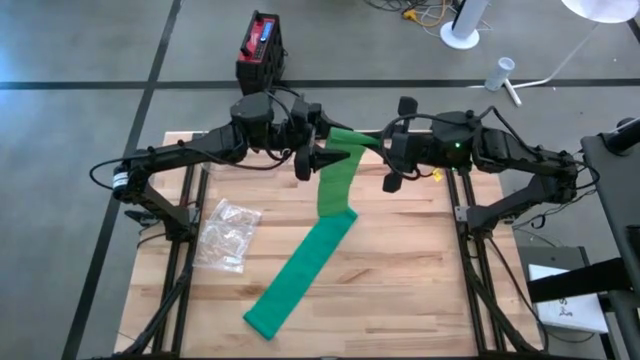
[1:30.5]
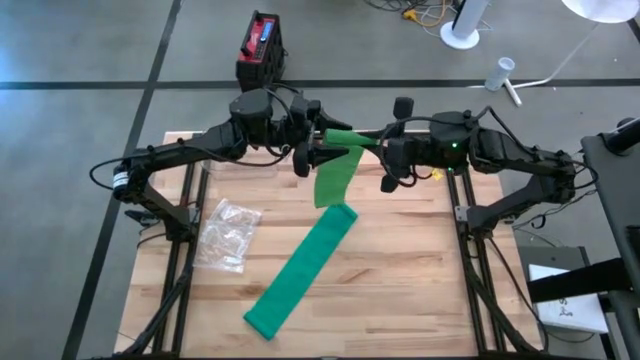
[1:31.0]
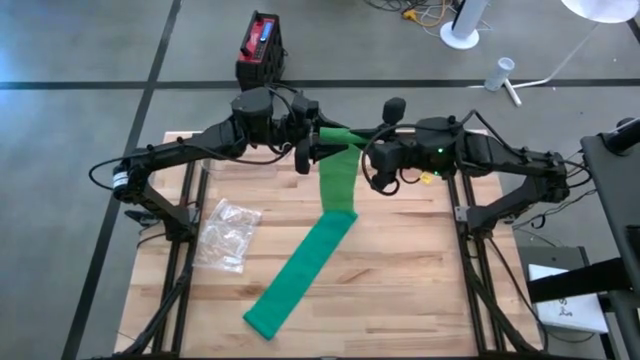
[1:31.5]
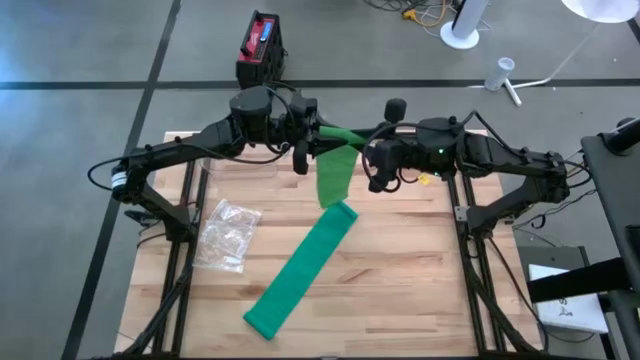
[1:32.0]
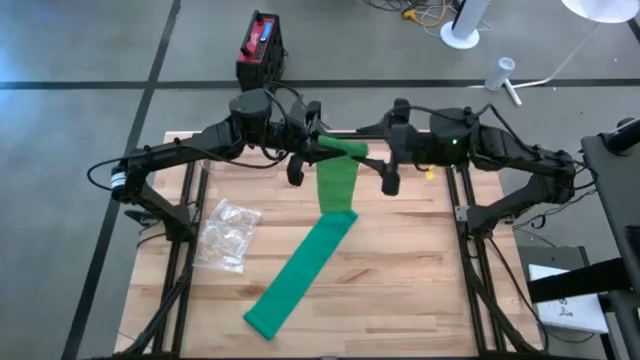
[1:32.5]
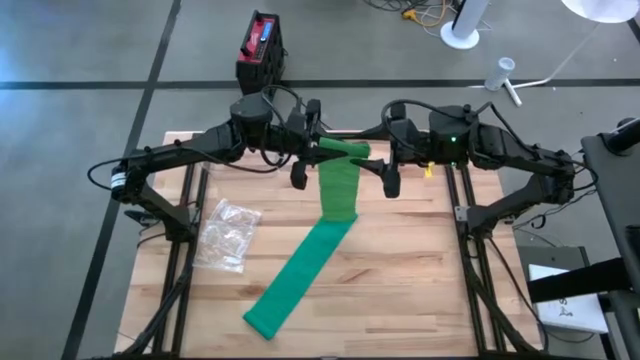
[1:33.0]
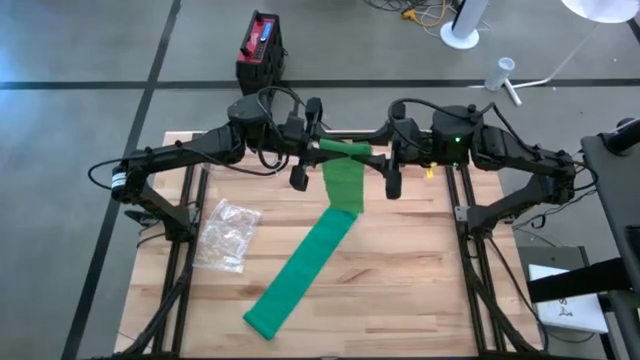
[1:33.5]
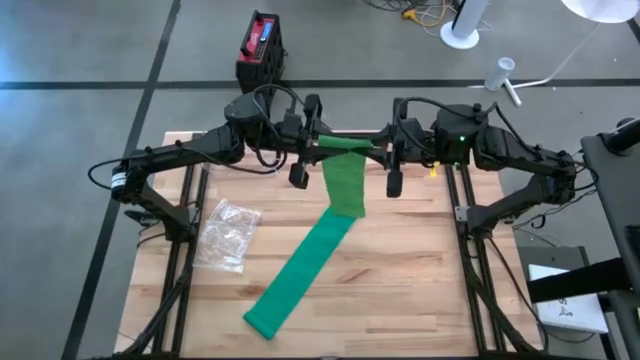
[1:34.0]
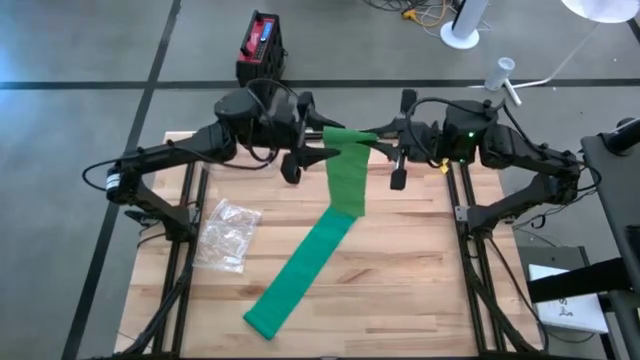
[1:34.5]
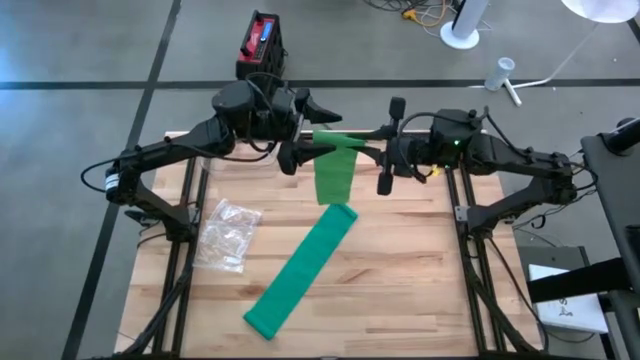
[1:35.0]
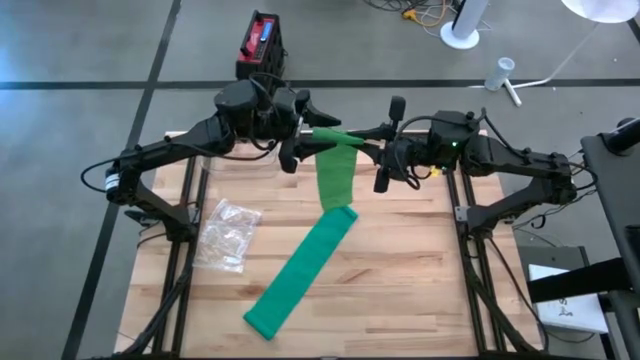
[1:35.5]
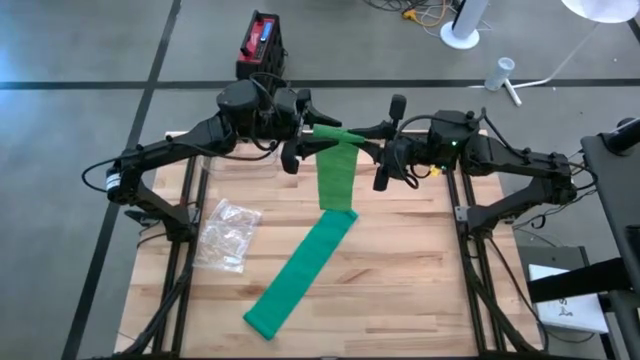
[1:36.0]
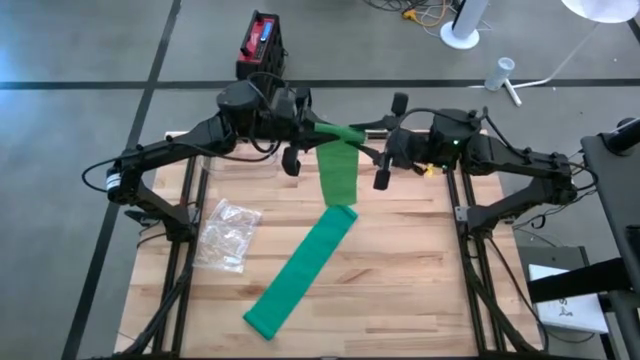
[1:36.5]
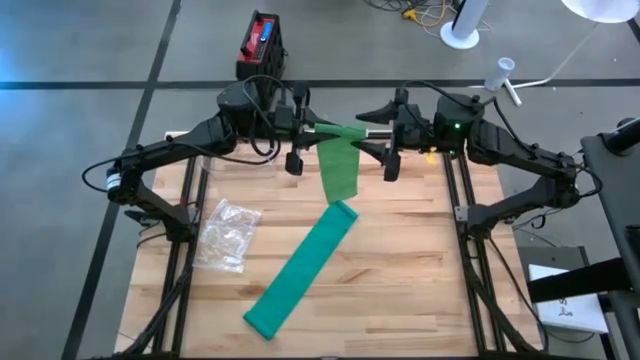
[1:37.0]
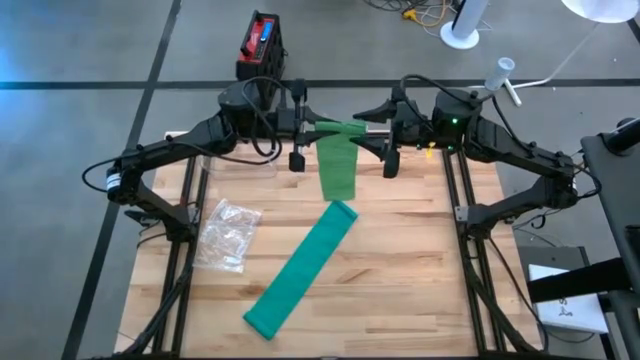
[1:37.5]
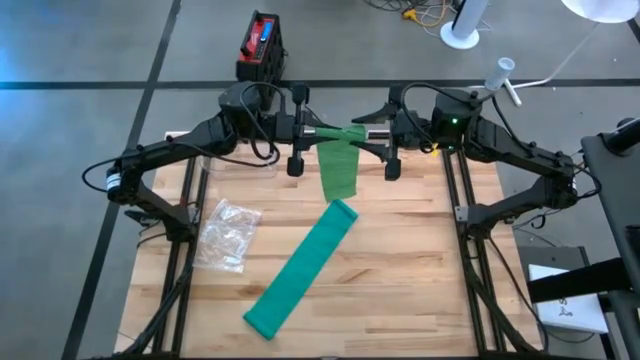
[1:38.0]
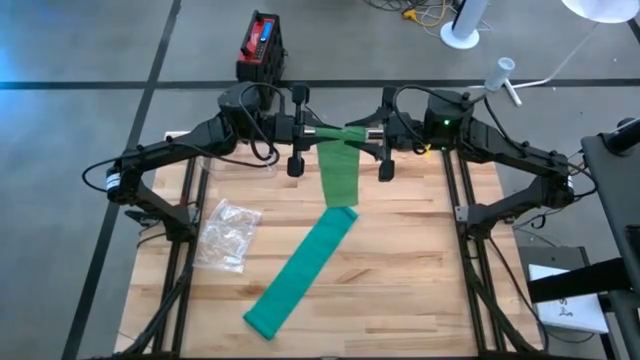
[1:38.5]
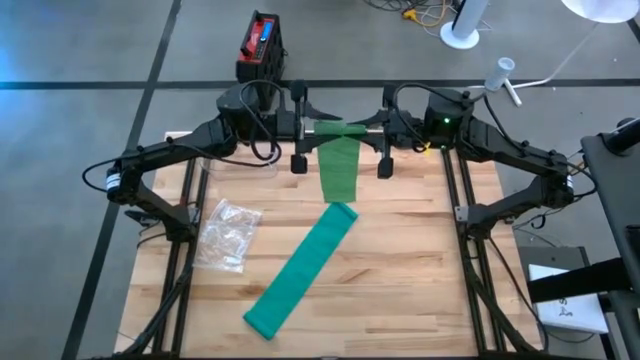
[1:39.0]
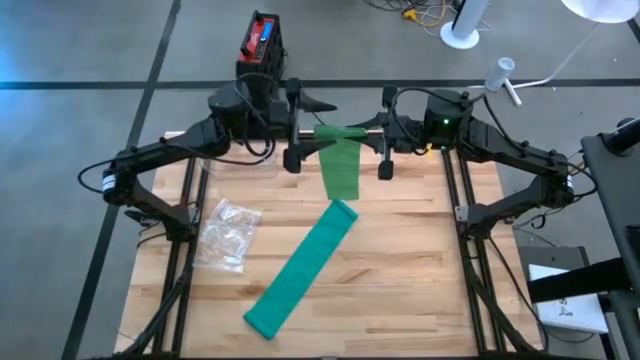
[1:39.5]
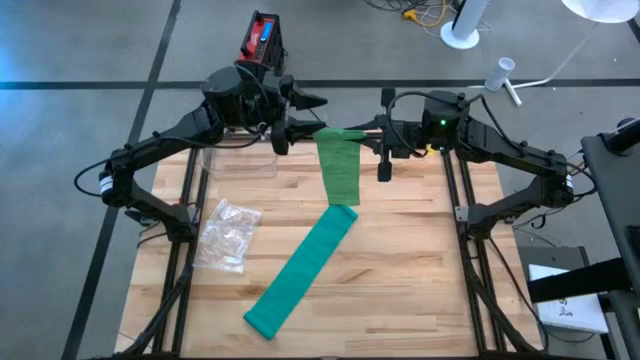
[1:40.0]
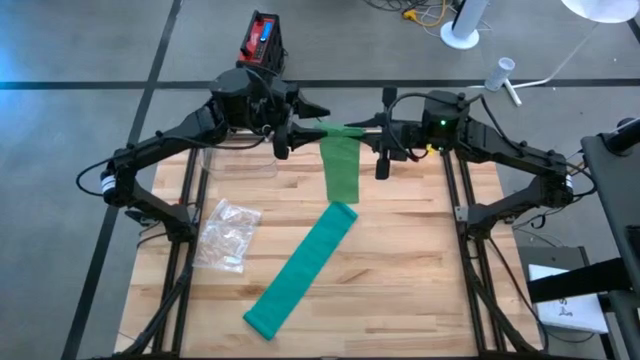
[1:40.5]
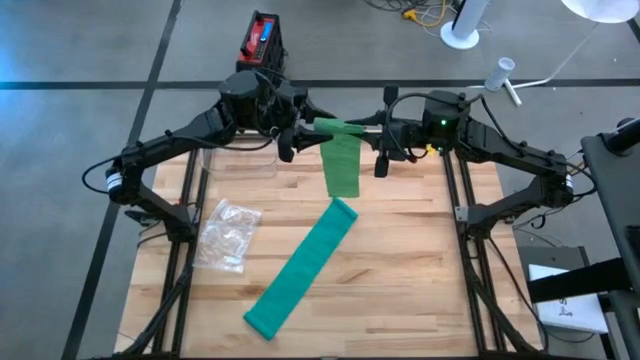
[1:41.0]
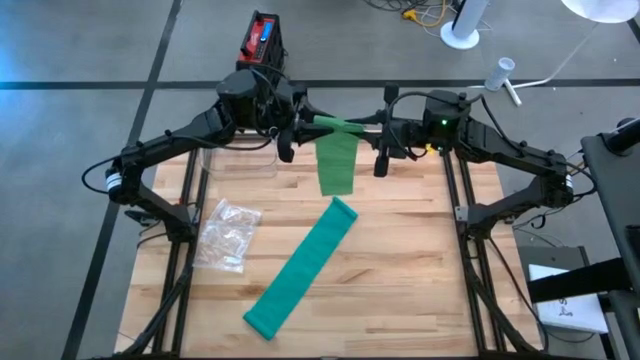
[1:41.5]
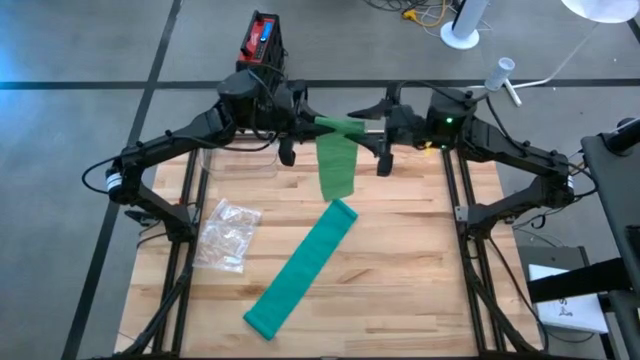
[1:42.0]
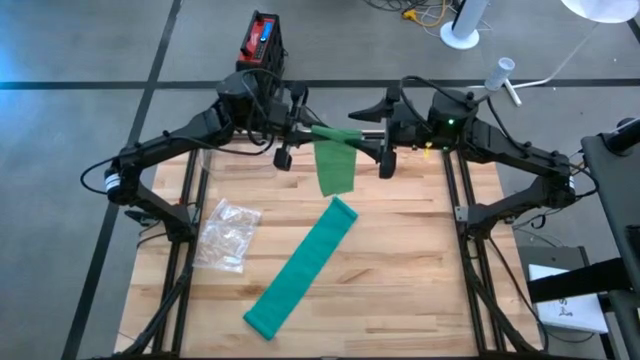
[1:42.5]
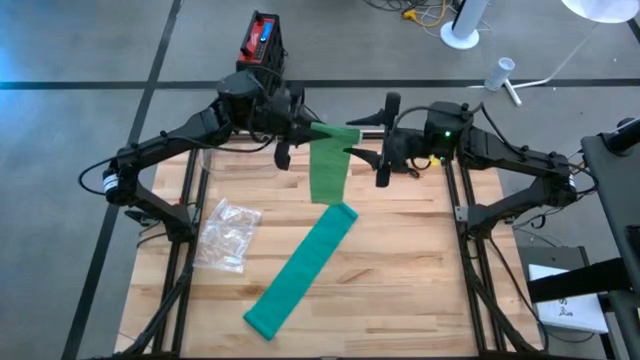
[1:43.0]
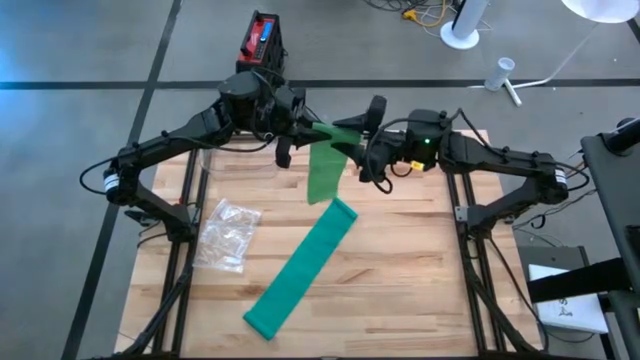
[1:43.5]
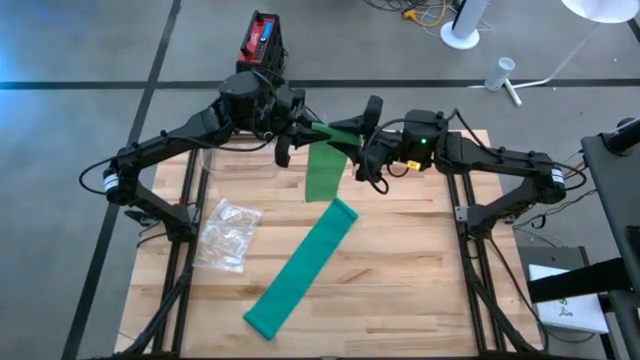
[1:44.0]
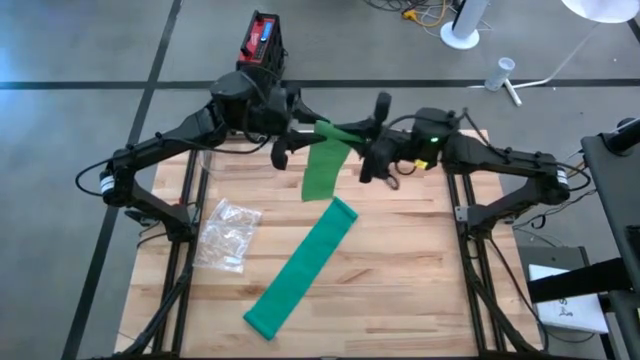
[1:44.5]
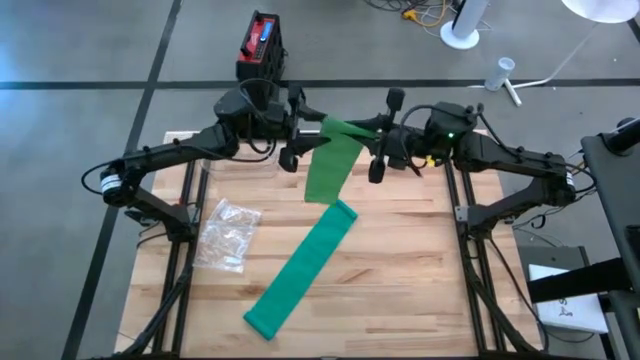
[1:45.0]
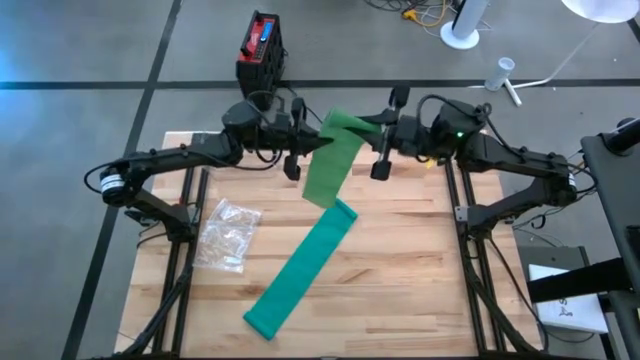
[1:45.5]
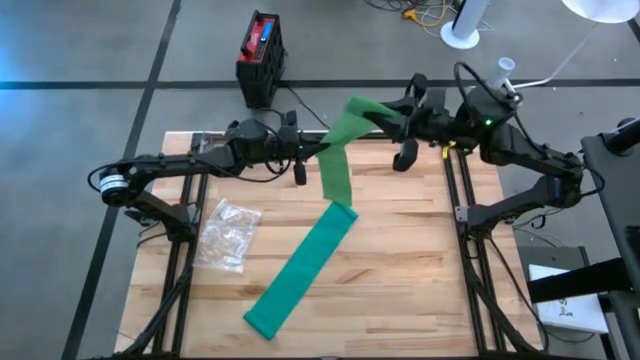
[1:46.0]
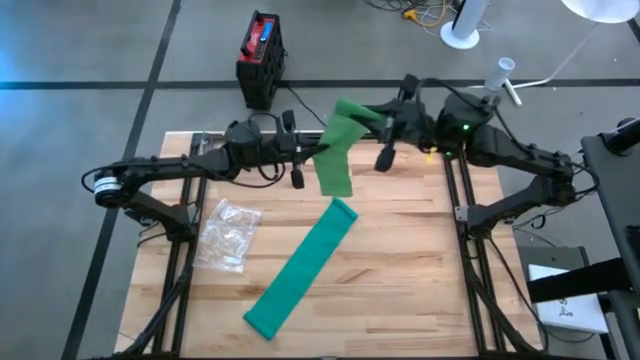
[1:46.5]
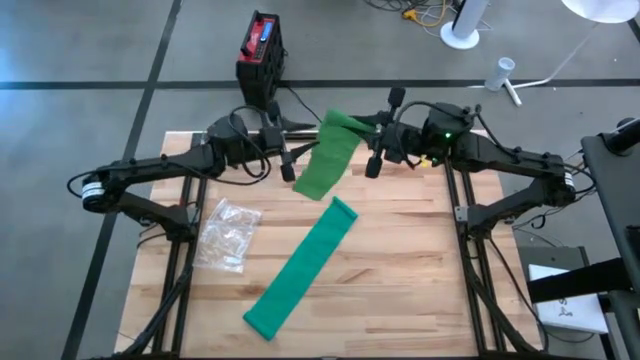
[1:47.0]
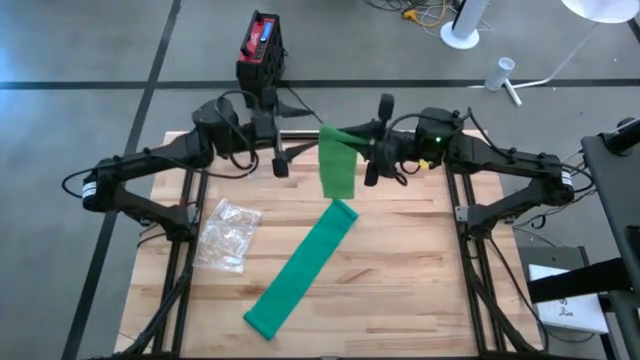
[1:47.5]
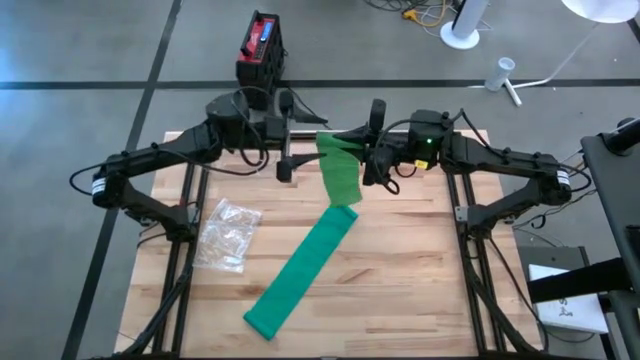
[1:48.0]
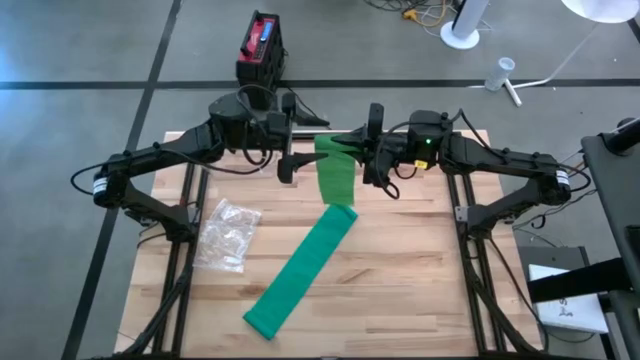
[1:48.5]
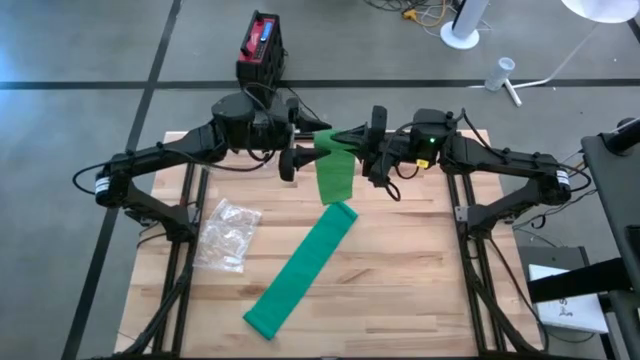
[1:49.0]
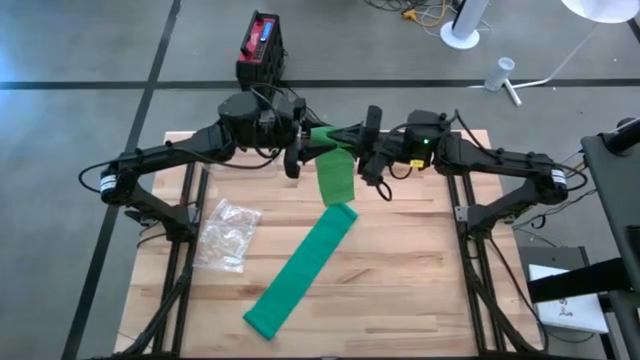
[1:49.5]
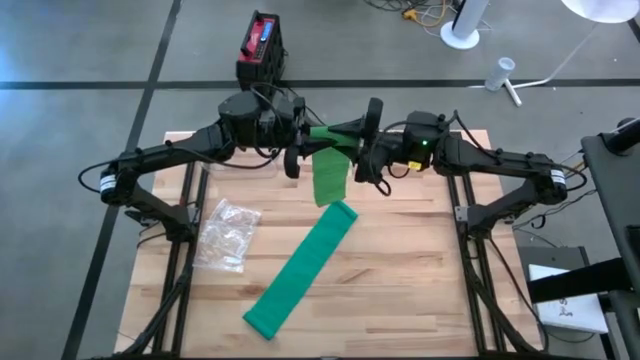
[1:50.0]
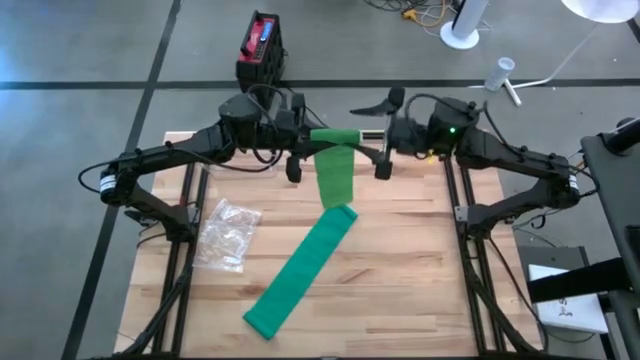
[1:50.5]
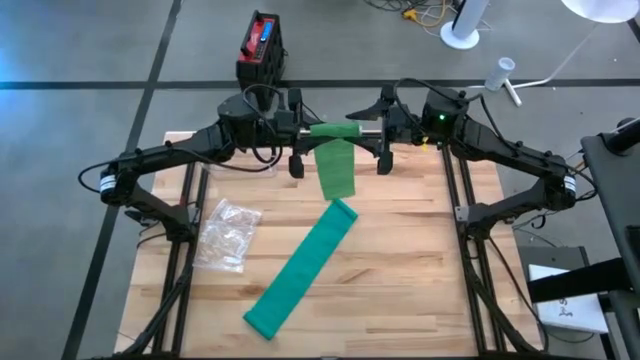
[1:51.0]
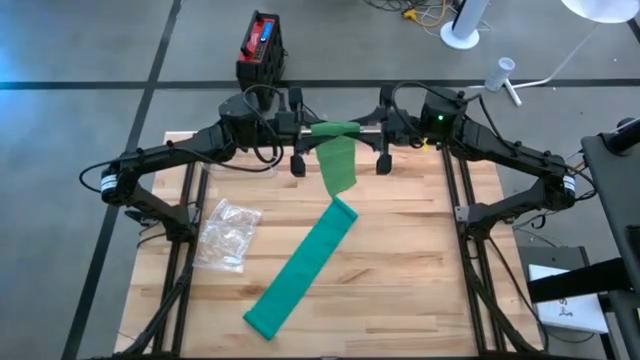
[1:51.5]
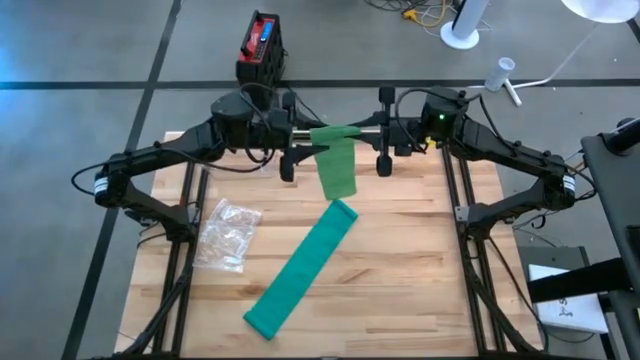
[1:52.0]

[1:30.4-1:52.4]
Task: Roll bandage
Roll the green bandage
